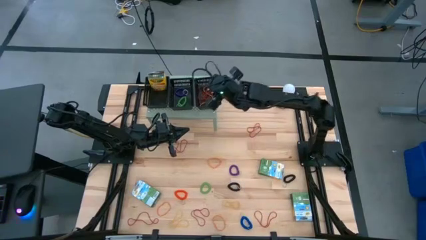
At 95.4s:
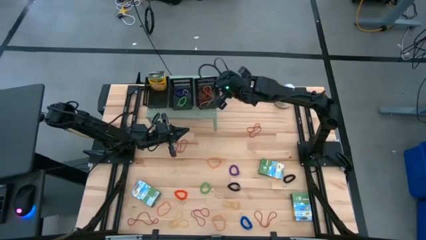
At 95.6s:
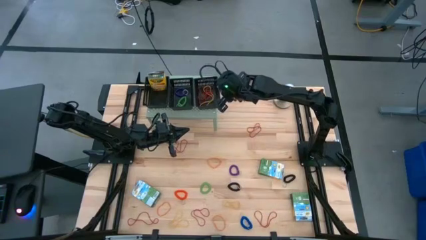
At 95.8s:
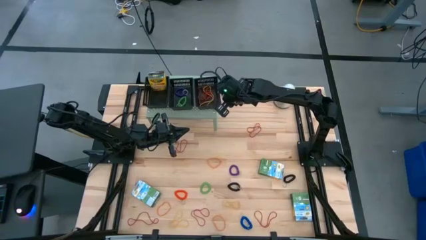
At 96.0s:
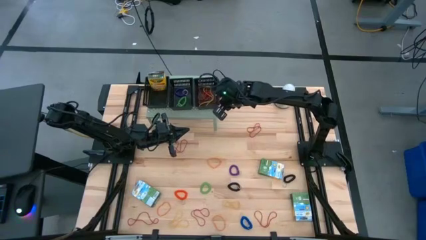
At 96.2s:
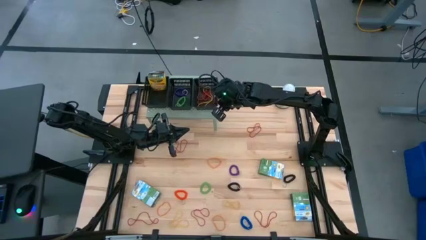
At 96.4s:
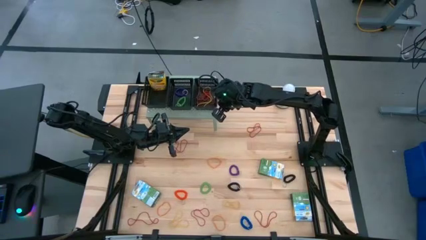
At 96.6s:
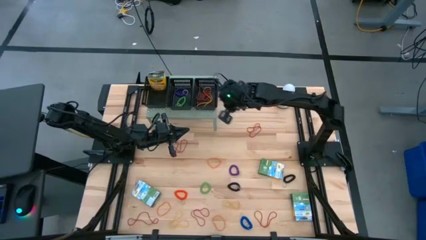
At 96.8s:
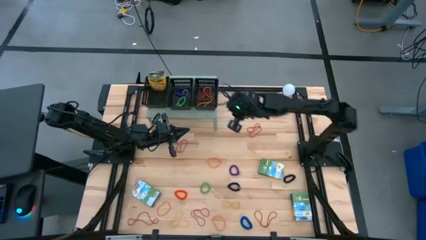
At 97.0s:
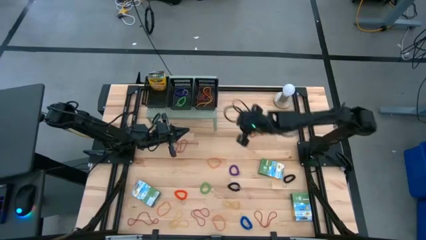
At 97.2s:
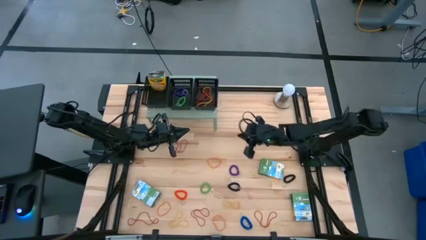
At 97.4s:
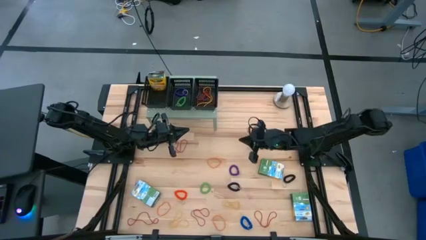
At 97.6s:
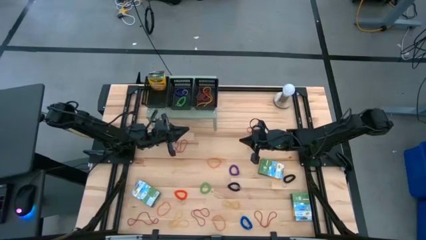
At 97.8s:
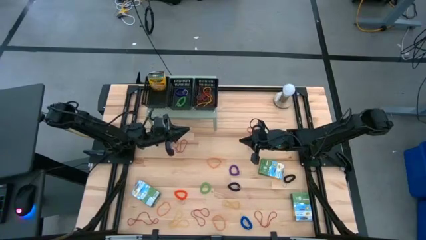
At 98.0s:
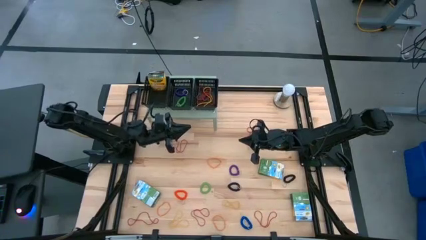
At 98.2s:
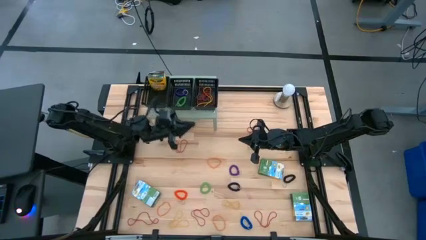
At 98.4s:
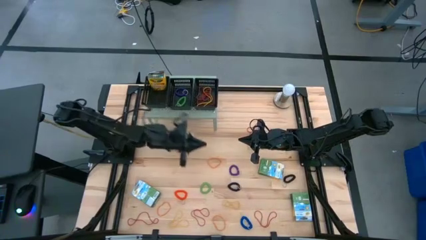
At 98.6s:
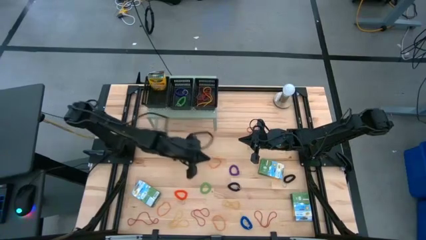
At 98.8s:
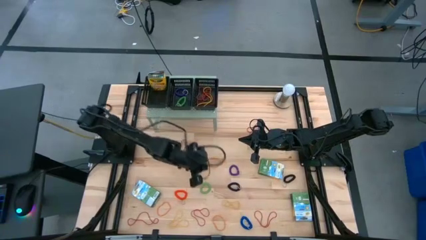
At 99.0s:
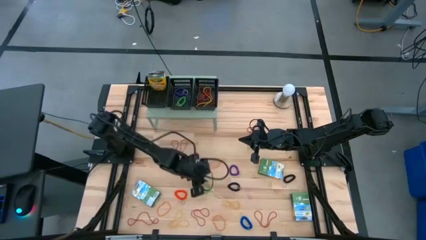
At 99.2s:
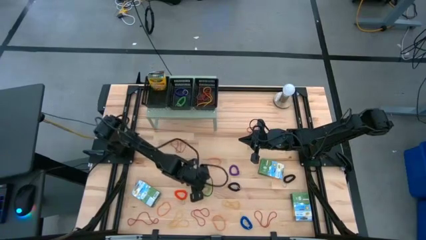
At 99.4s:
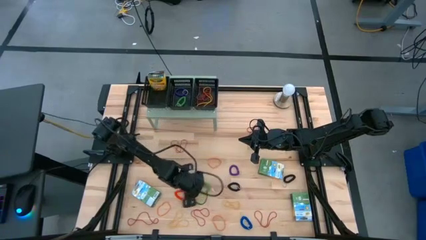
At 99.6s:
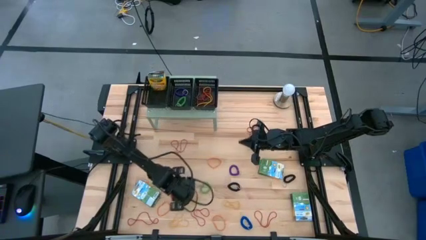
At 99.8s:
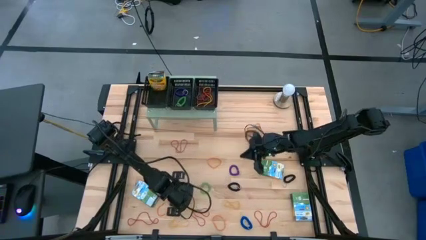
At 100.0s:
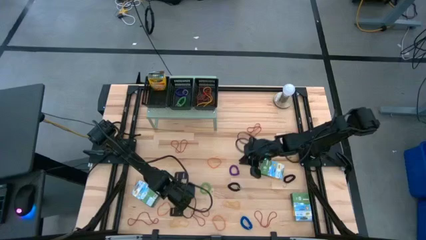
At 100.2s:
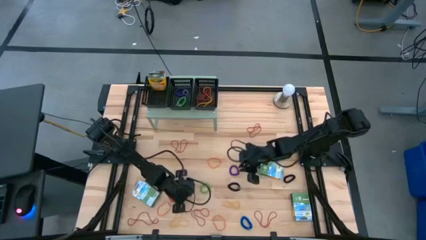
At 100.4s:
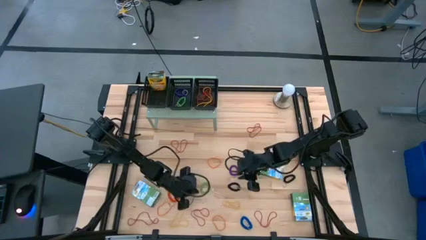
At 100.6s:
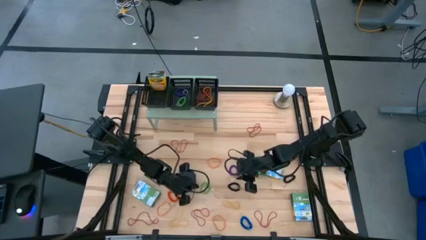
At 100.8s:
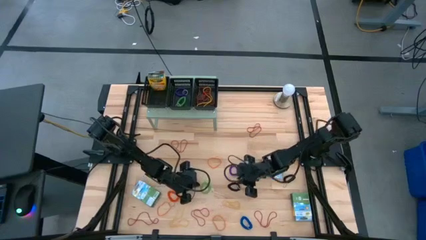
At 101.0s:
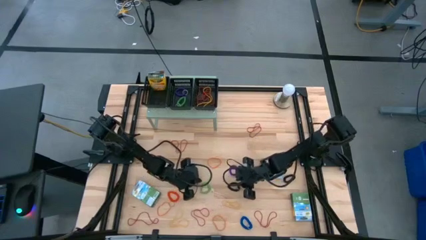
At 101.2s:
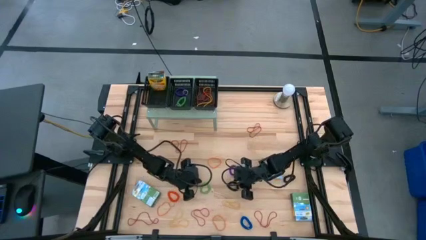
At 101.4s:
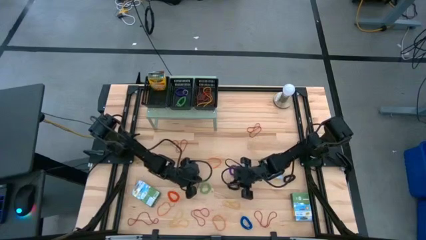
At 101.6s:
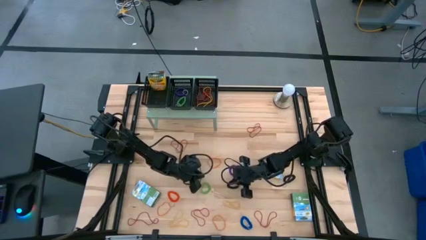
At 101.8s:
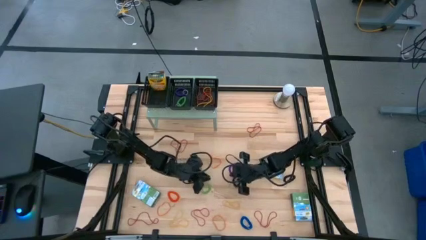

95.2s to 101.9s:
Task: Pick & Place Office Desk Supplies
Put the black spring keychain into the middle black bin on the shelf

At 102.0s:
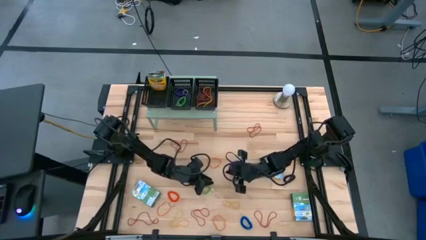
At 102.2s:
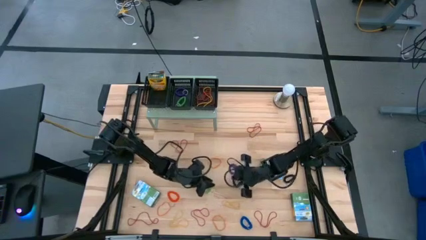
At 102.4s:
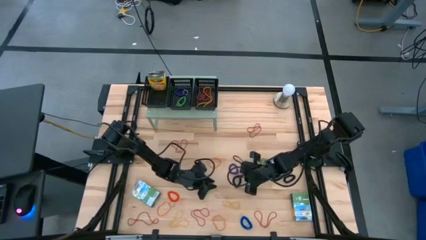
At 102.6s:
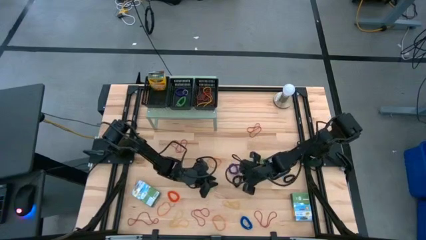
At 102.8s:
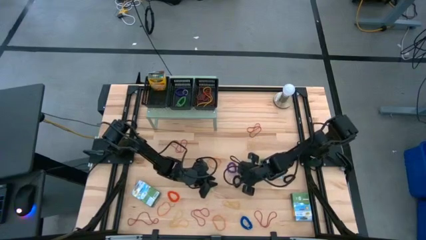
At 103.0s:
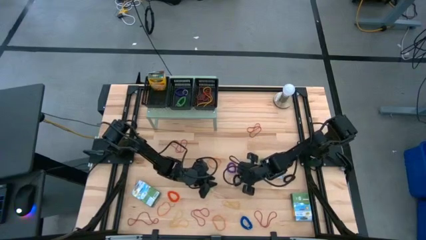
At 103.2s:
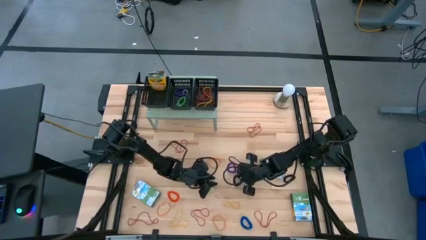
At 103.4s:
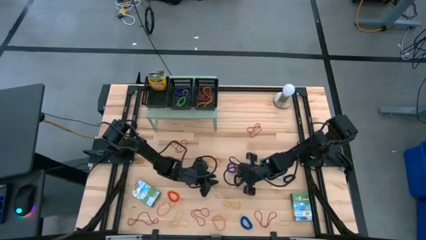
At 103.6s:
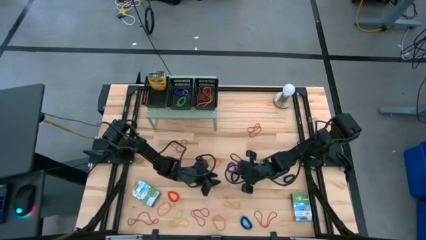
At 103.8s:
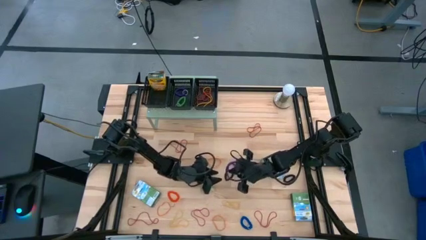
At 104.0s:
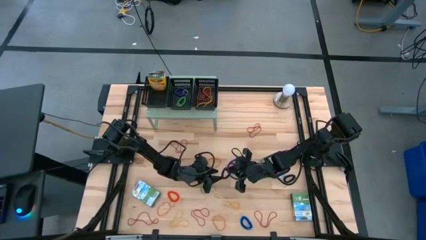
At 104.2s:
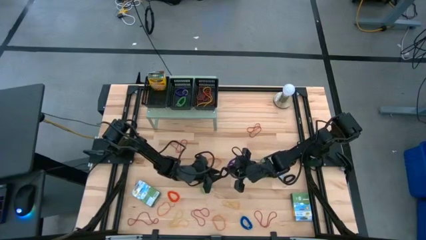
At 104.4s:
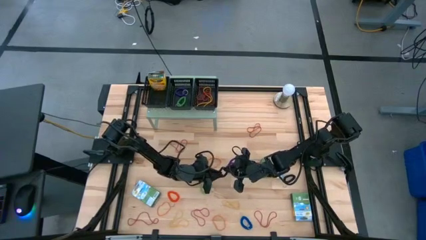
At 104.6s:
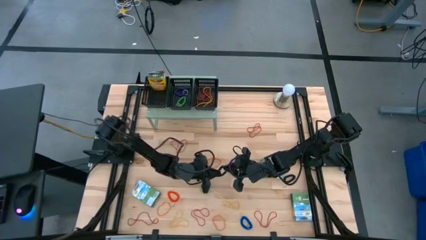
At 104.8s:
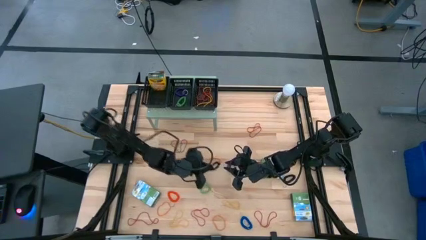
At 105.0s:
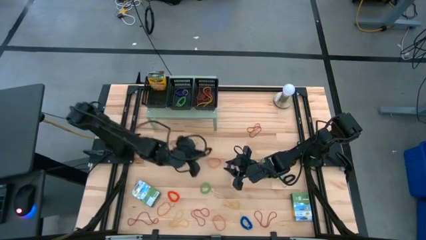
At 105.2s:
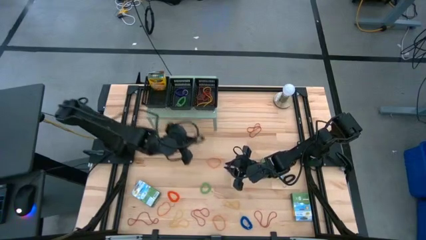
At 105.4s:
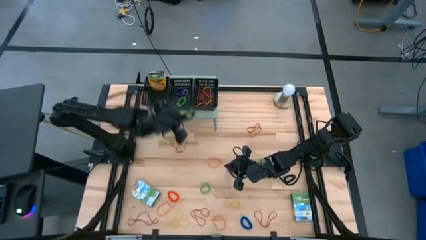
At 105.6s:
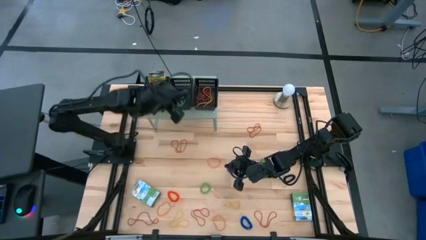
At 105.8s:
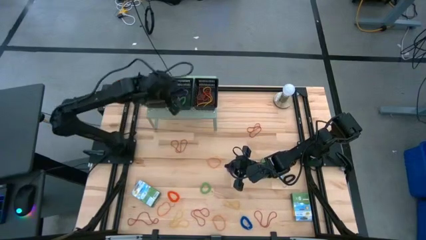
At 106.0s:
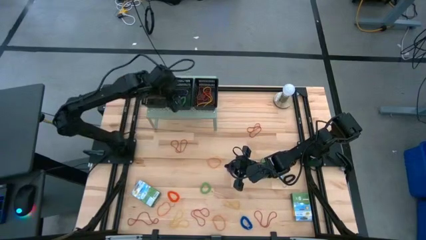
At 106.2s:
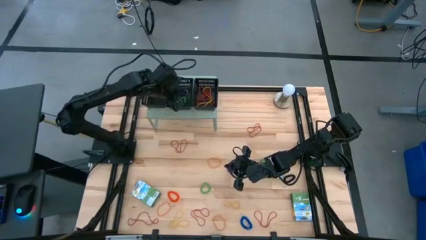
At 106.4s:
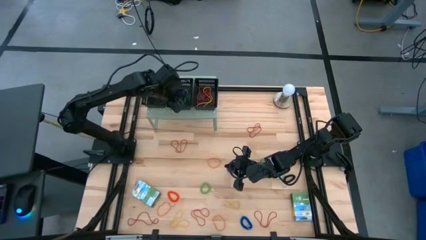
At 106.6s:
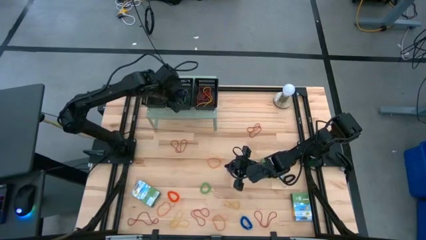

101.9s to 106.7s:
Put the black spring rubber band into the middle black bin on the shelf

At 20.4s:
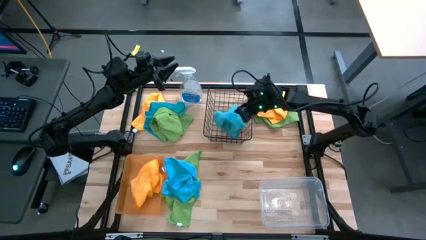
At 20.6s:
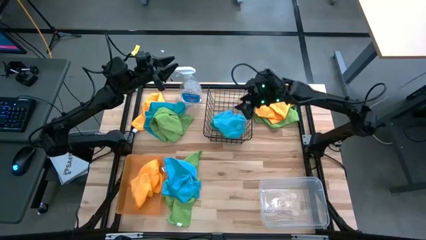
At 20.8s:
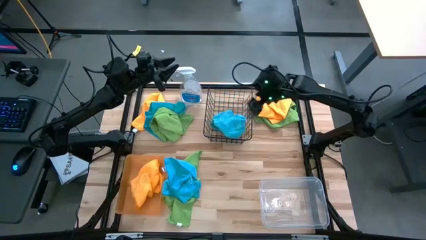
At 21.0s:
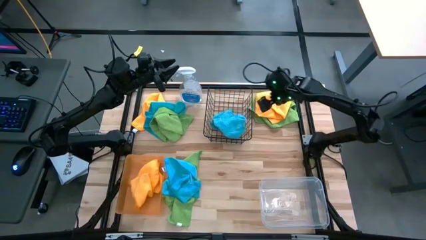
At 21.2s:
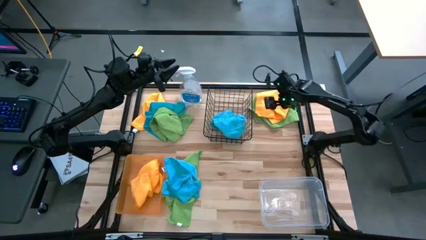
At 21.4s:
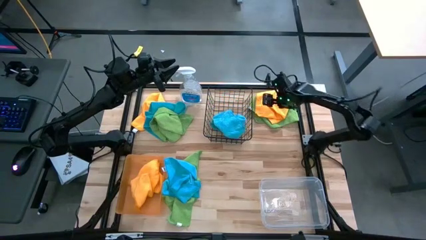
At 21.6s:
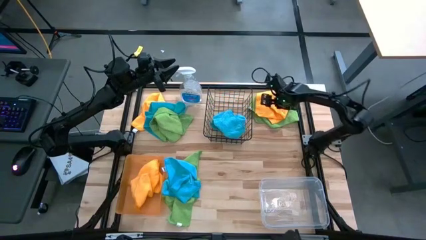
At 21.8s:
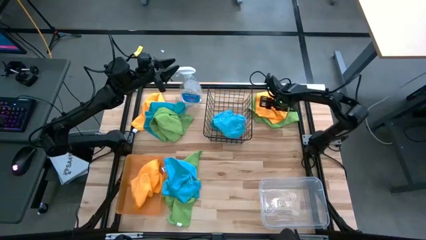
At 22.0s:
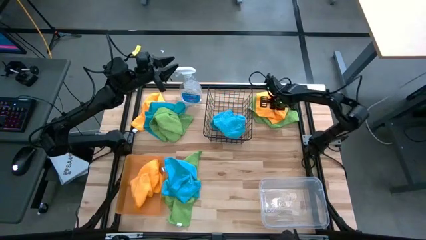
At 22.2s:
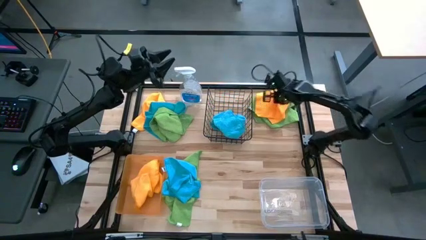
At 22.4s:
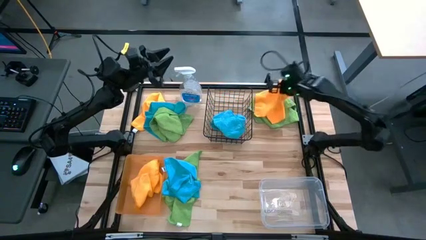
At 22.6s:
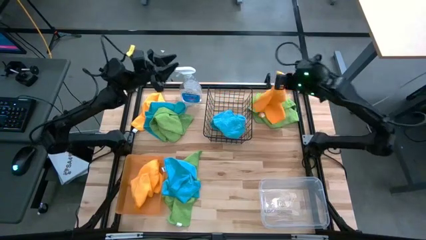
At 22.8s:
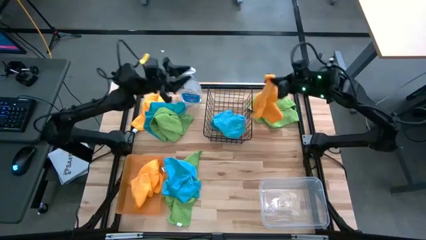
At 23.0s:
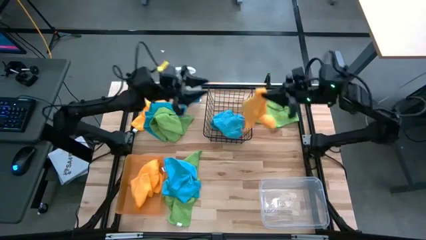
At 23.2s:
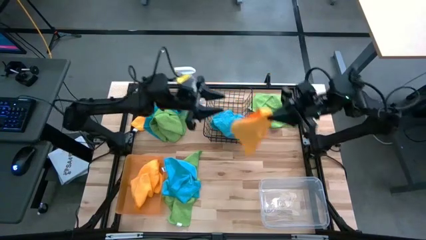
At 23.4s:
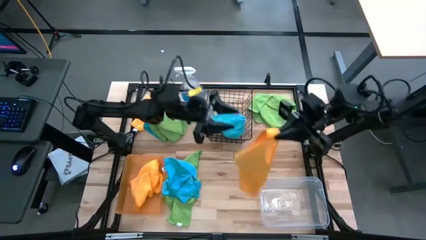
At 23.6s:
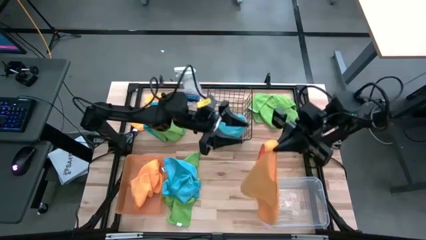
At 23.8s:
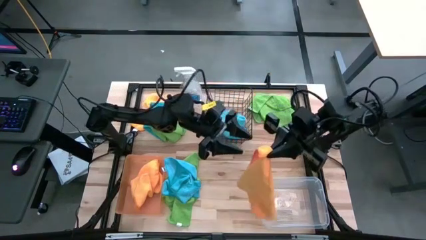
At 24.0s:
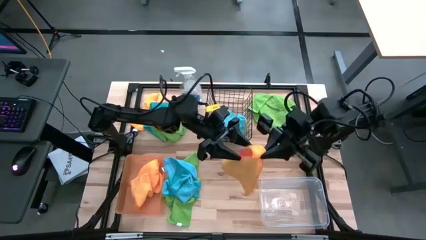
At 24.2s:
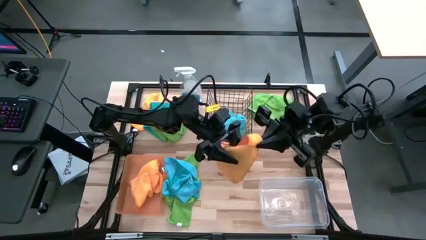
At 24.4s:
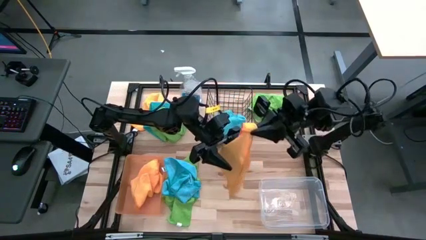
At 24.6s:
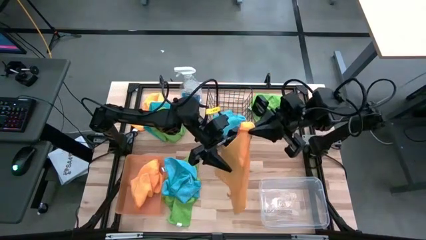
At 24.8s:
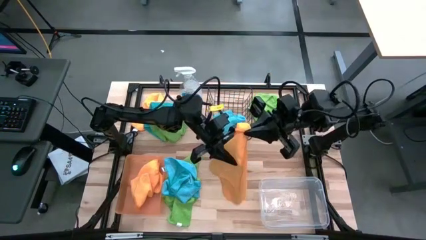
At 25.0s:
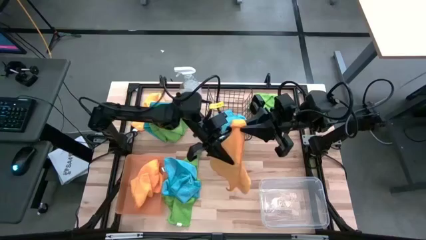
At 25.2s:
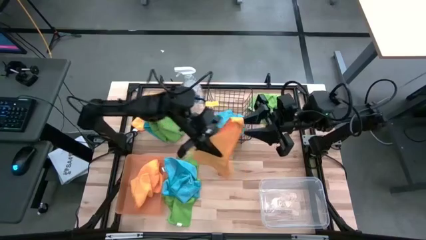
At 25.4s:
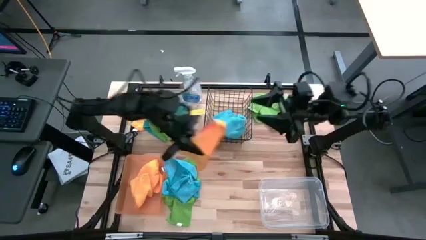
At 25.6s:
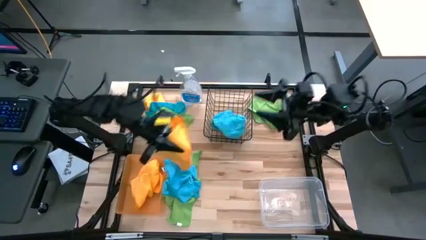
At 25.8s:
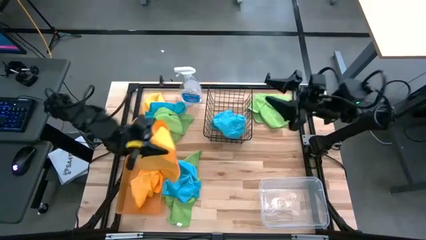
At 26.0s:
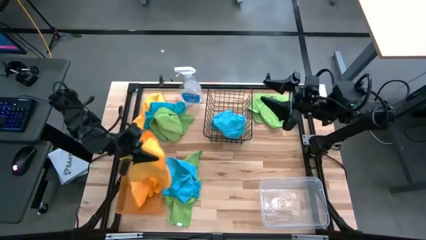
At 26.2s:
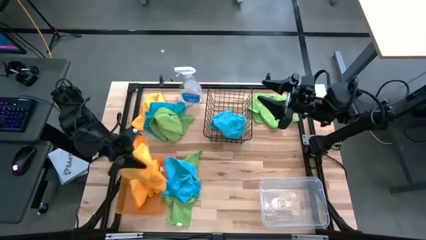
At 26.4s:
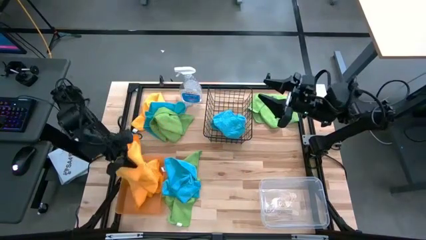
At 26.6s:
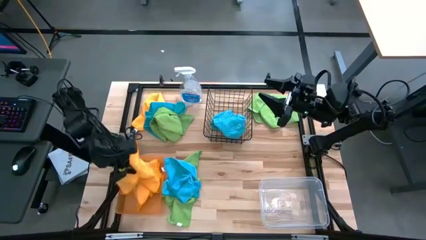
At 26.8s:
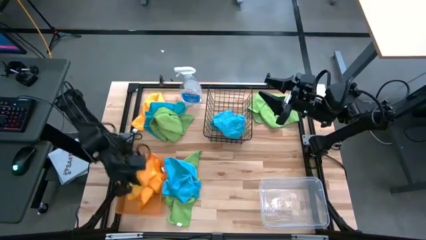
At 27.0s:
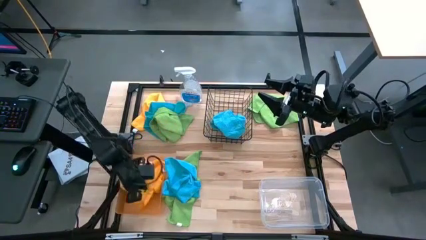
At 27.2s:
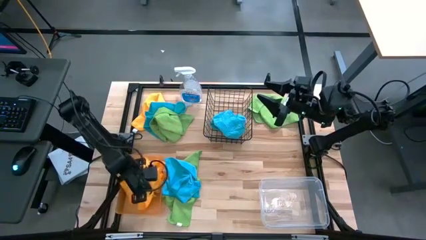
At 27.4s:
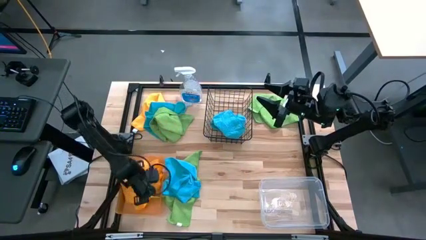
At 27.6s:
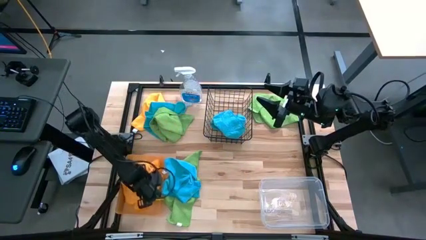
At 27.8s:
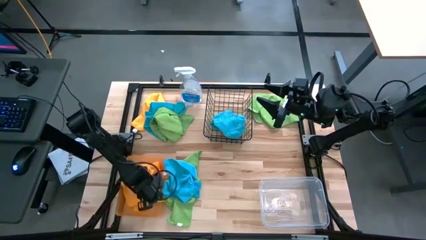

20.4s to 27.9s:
Task: Sort microfiber towel by color & place in baskets
Put the top right orange towel into the orange bin
